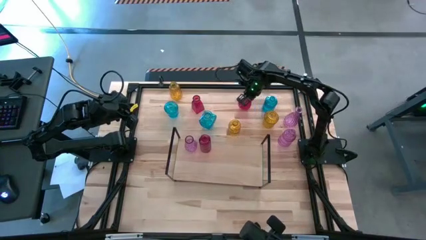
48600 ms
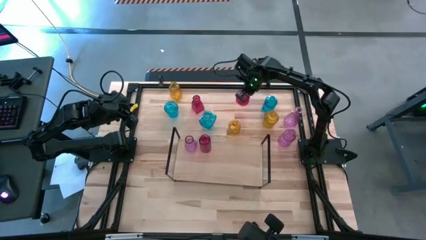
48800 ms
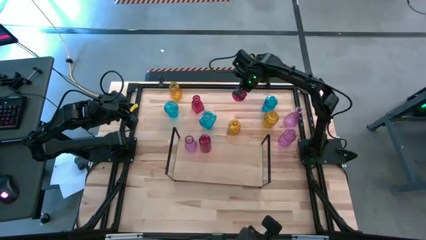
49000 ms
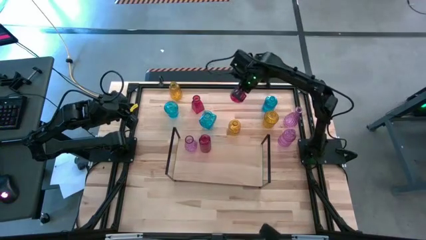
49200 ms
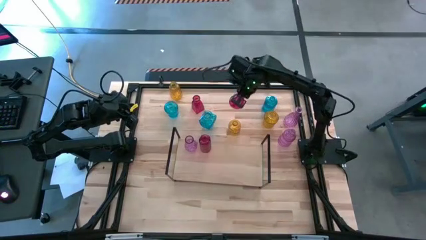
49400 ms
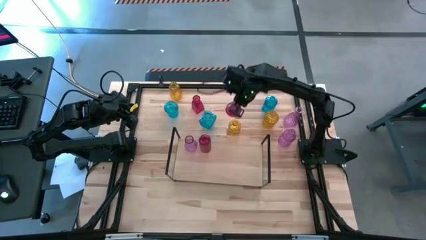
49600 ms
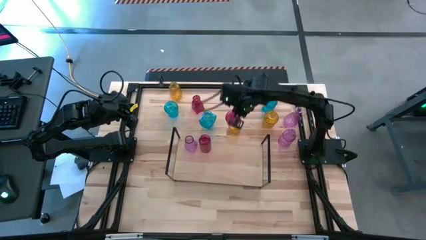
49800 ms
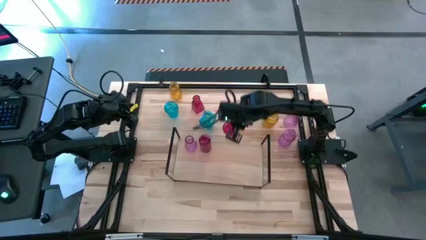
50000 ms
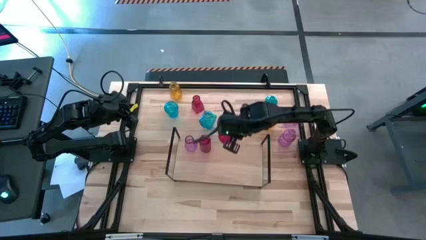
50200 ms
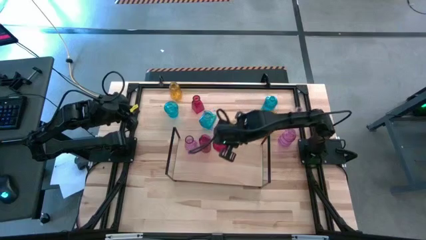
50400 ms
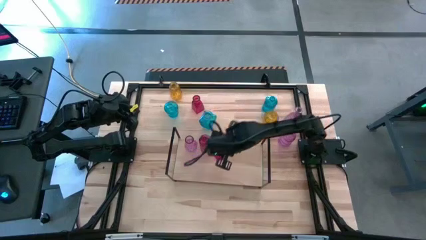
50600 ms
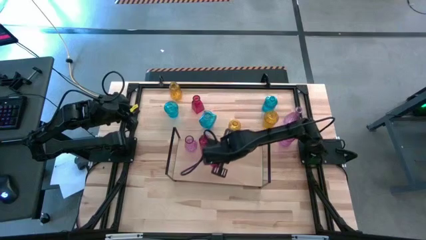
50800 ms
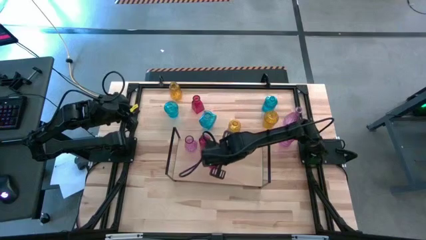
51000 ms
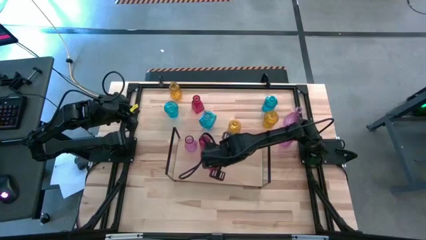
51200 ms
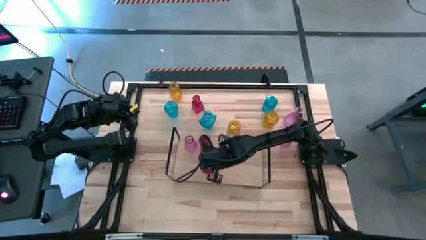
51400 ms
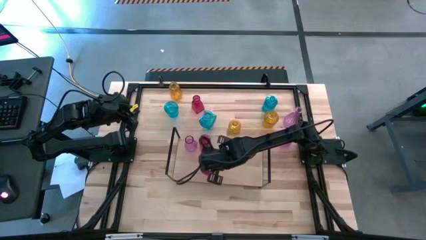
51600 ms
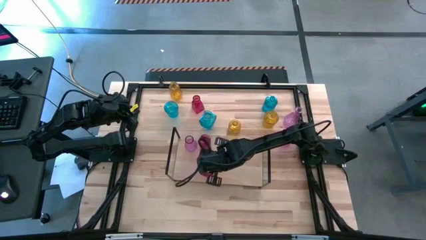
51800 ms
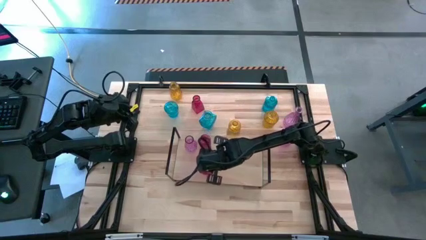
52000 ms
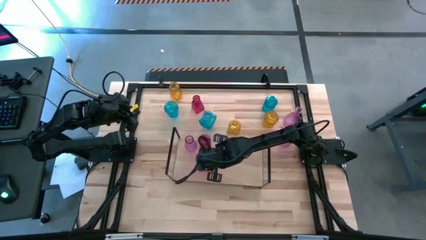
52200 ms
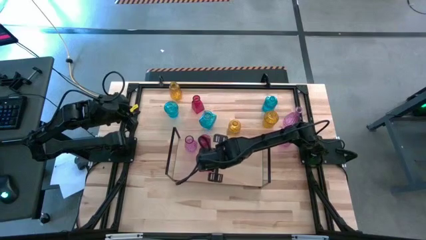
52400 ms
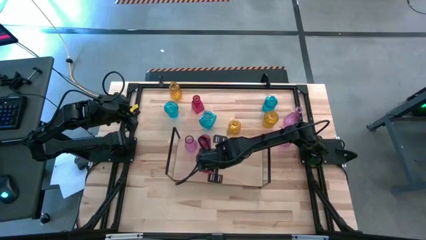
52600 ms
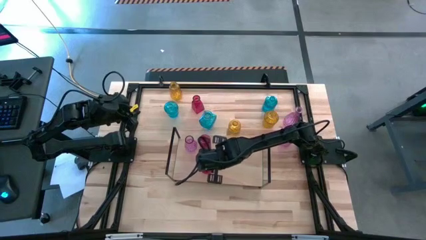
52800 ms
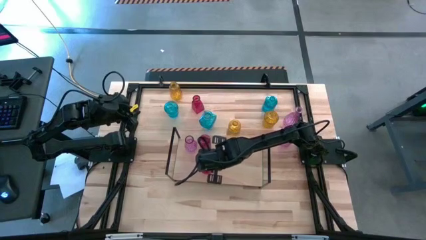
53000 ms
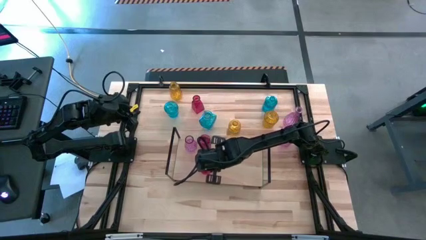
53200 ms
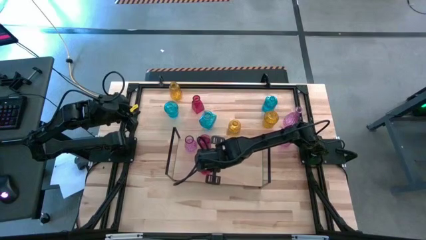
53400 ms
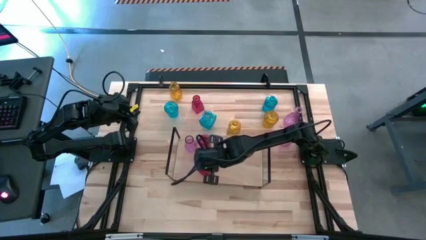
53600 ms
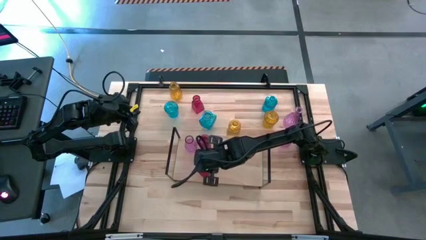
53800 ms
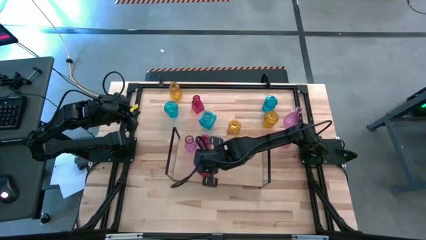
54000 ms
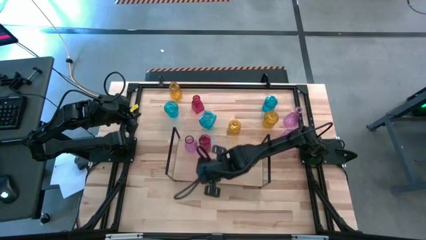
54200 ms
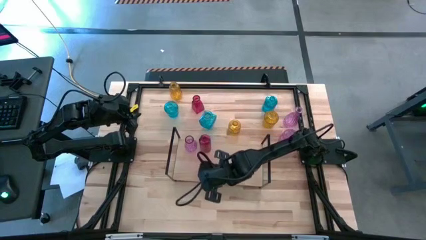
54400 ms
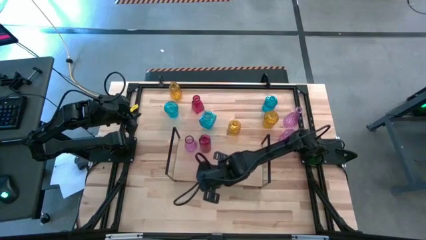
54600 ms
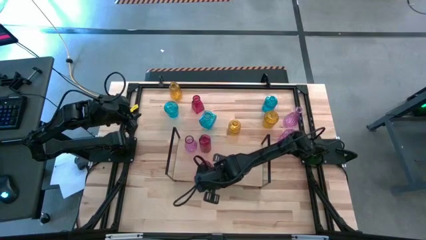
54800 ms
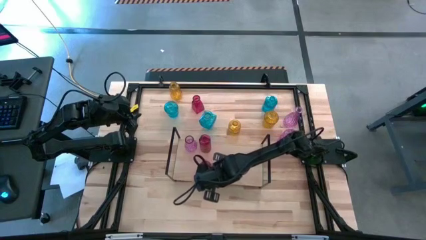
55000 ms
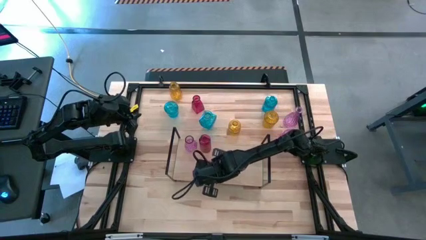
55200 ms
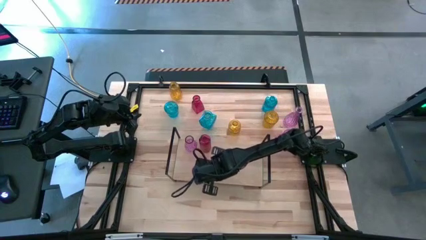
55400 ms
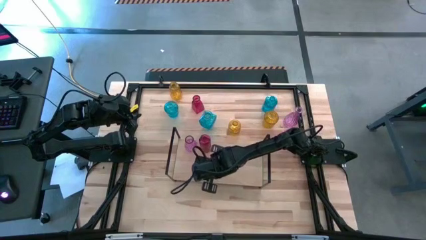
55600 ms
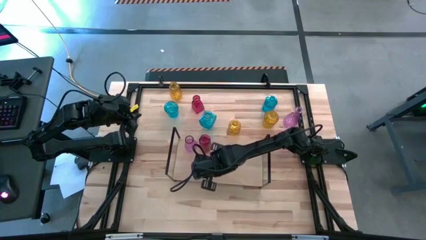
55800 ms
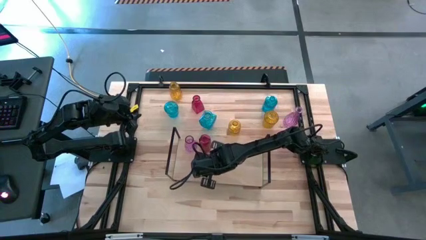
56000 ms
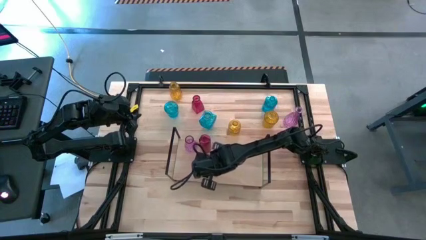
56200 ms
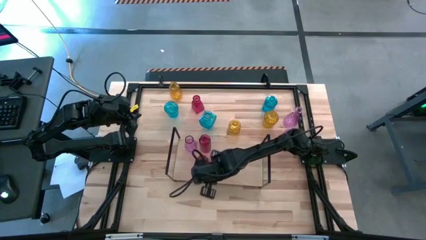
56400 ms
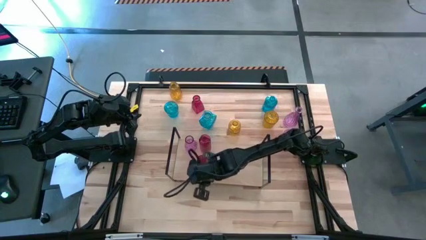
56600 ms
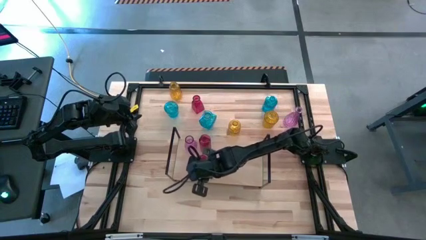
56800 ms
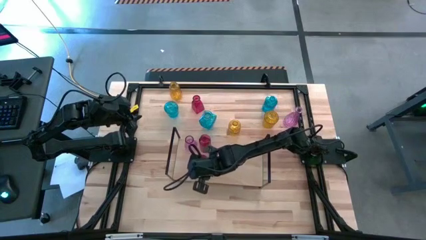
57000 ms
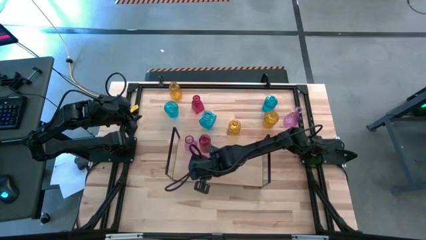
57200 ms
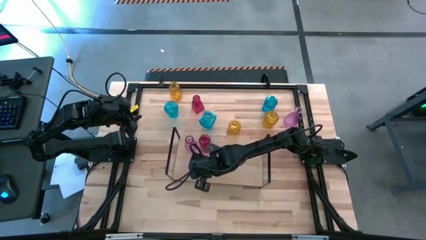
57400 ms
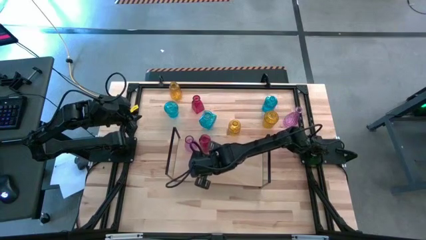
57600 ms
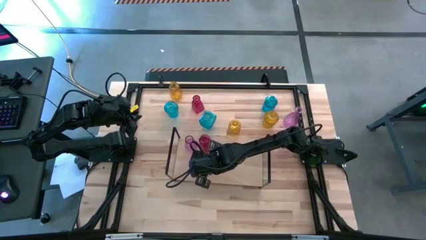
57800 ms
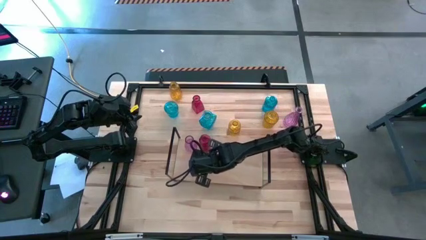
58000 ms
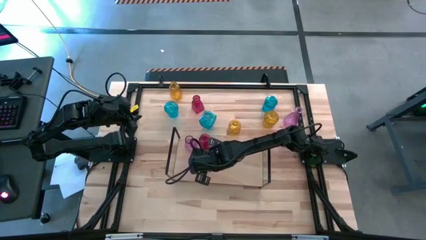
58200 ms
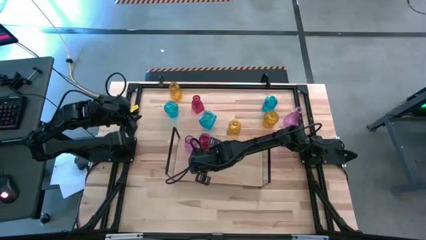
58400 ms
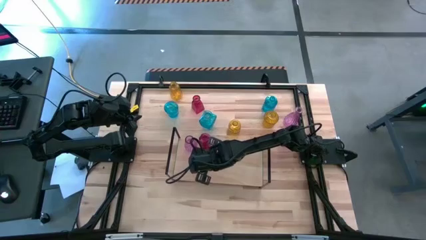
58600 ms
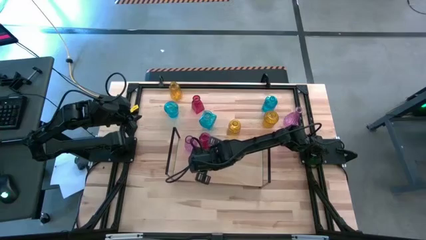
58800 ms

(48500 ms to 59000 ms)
Task: sort vases onto shelf
Put the right red vase on the shelf aligned with the other red vase

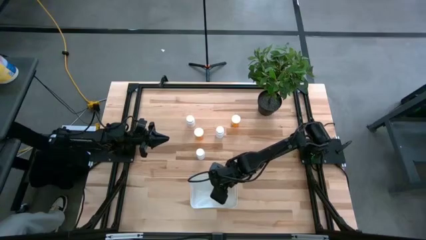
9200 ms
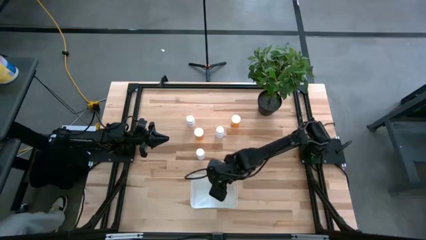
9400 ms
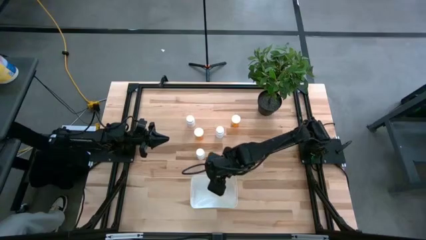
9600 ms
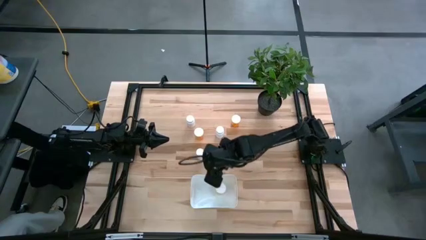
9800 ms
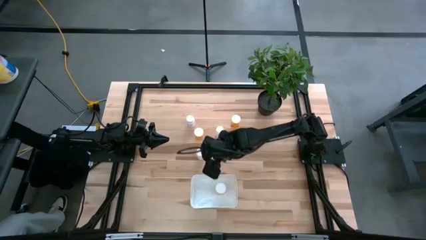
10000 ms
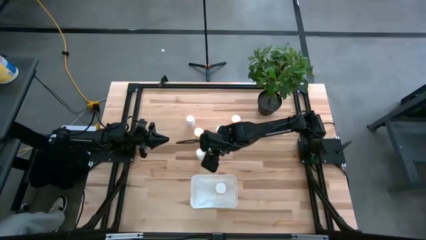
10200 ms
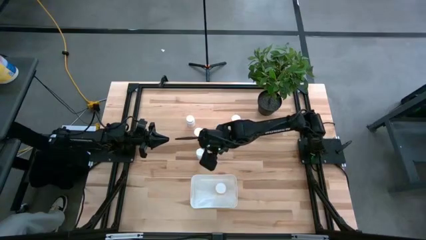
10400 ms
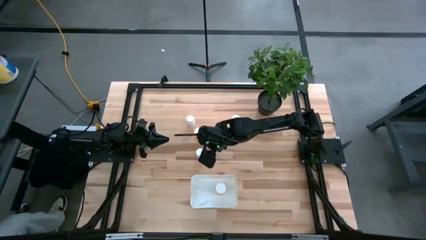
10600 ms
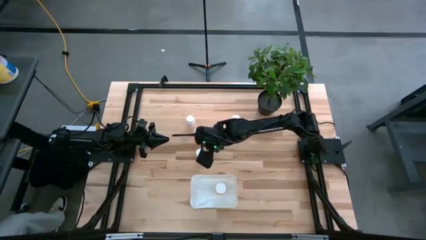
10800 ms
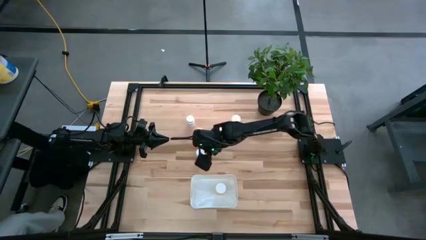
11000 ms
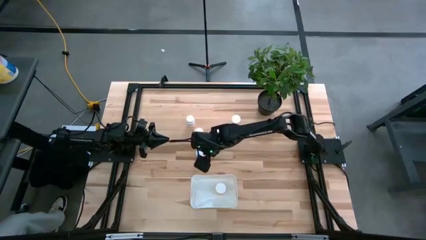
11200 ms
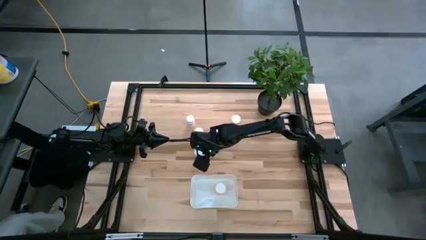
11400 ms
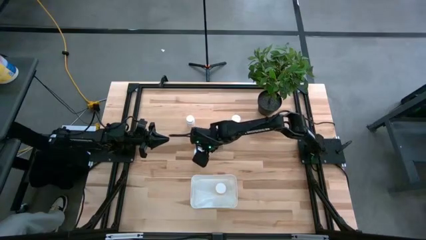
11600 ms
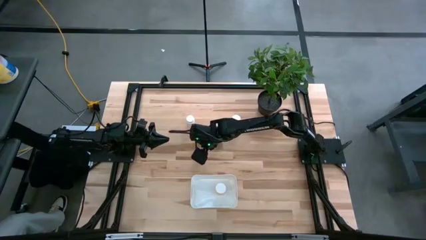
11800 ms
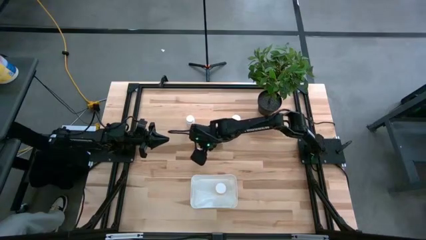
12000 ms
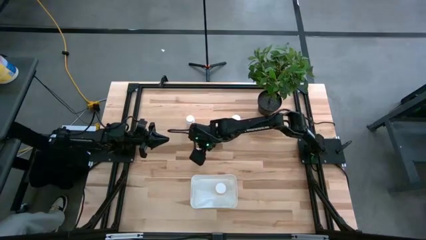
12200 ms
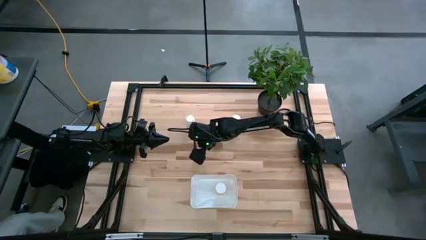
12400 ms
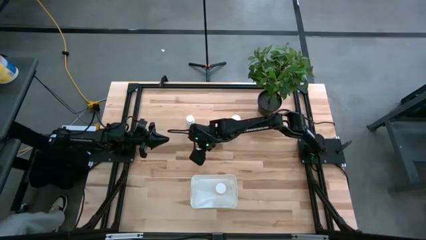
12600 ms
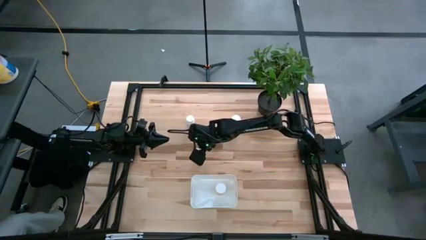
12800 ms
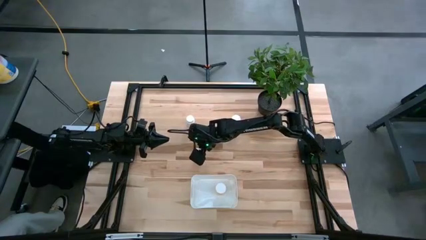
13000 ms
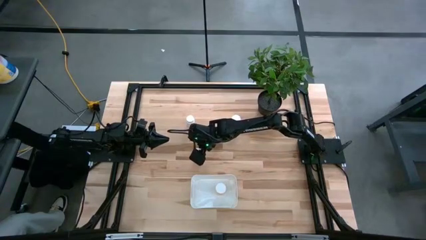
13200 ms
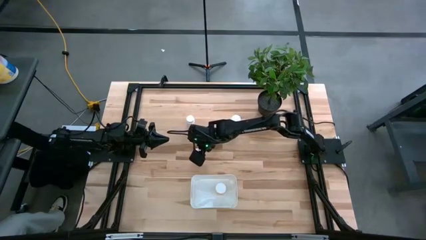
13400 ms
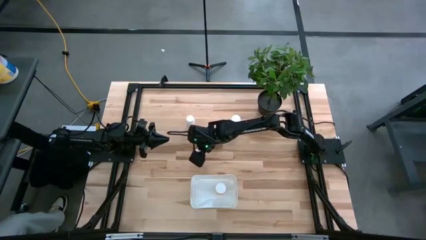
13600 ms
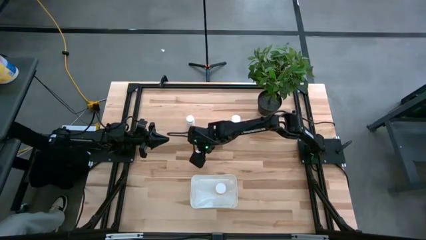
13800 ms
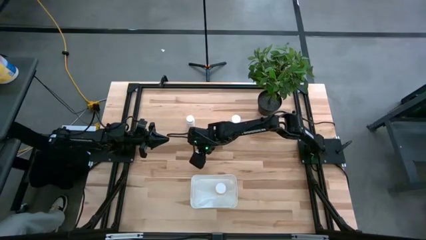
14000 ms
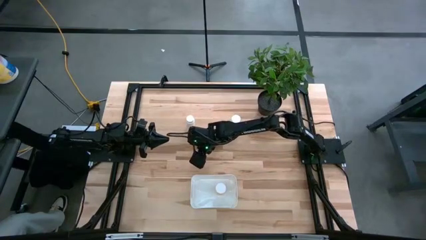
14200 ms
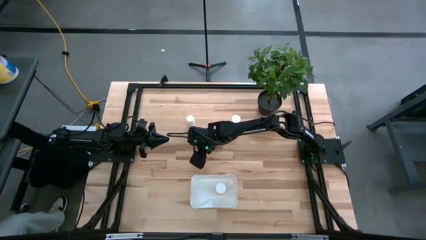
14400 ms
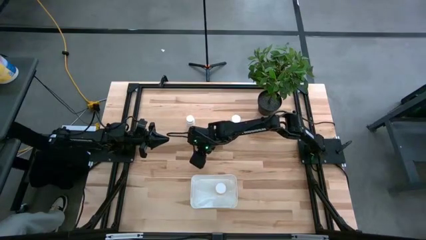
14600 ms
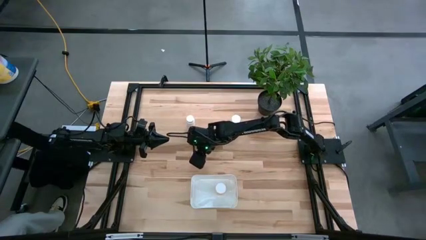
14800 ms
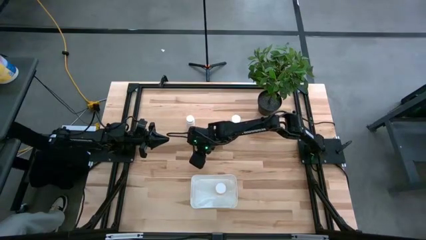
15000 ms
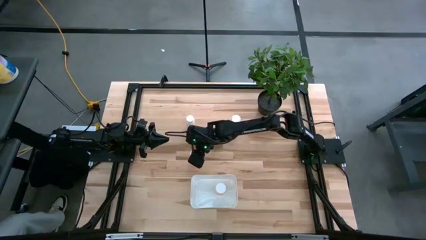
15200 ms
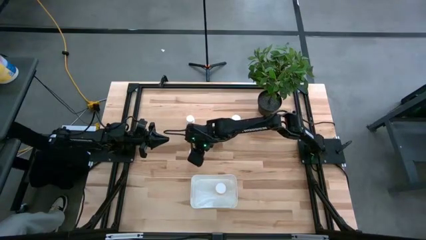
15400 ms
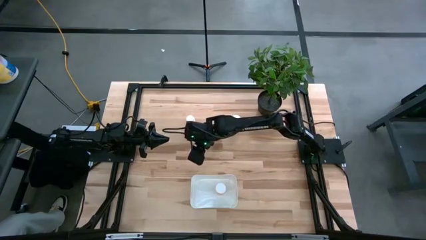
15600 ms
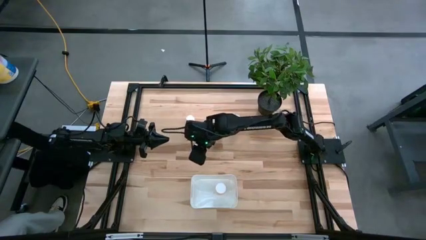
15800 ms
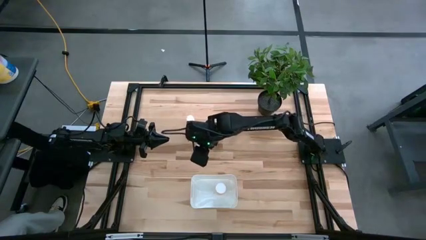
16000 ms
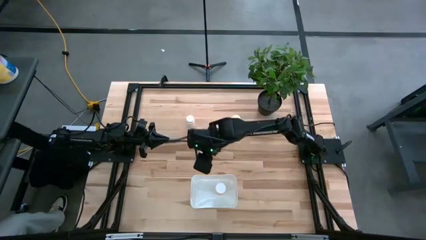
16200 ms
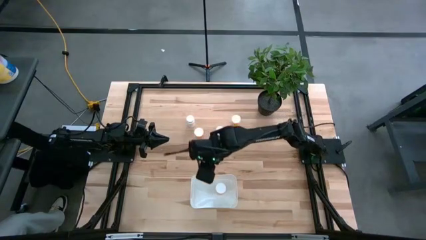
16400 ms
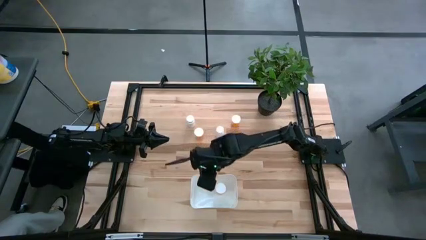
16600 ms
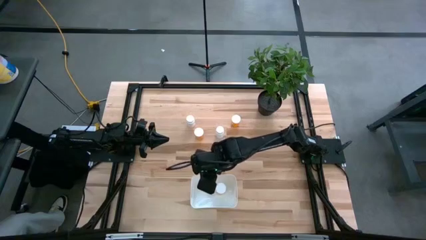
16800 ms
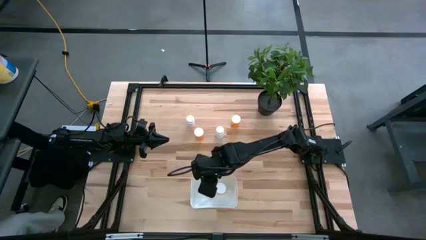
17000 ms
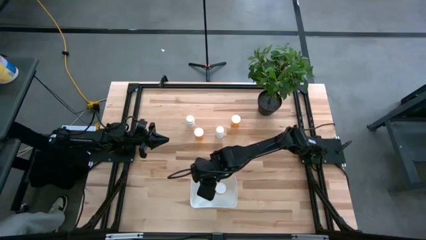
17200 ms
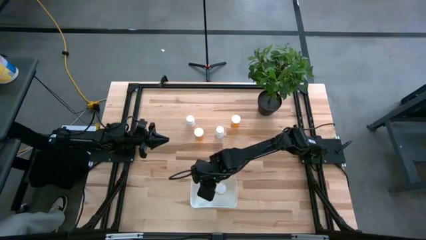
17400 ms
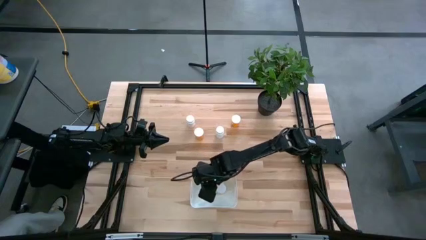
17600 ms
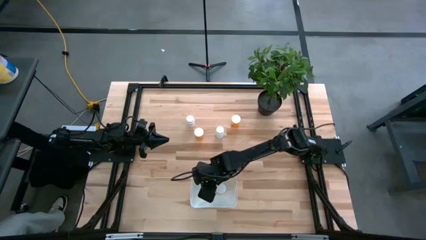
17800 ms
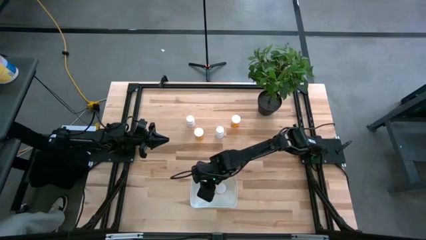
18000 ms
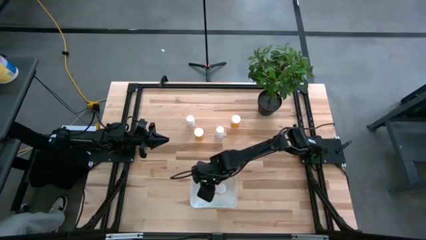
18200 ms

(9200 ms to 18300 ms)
Task: Pick and place pill bottles into a basket
Put the bottom white medicine bottle into the container
